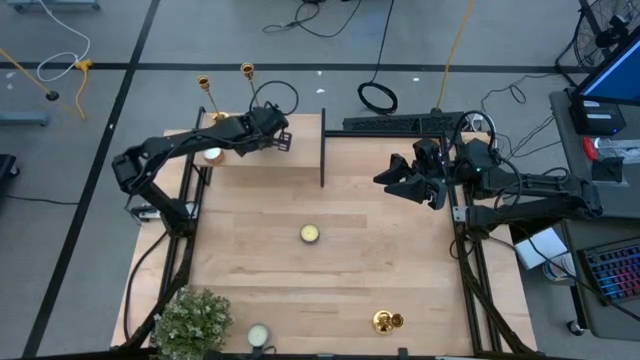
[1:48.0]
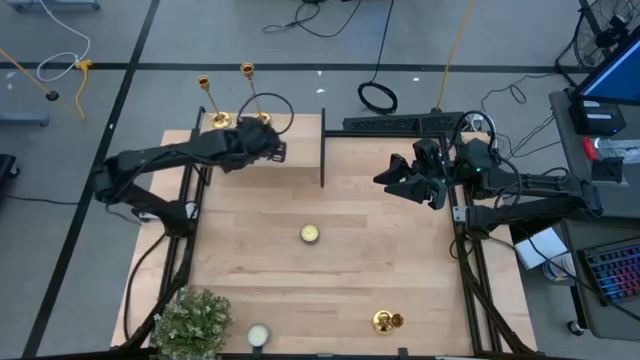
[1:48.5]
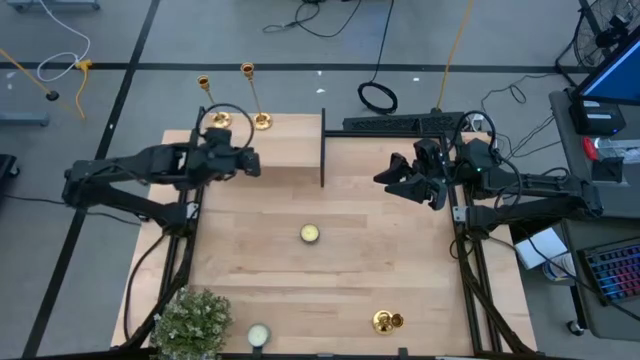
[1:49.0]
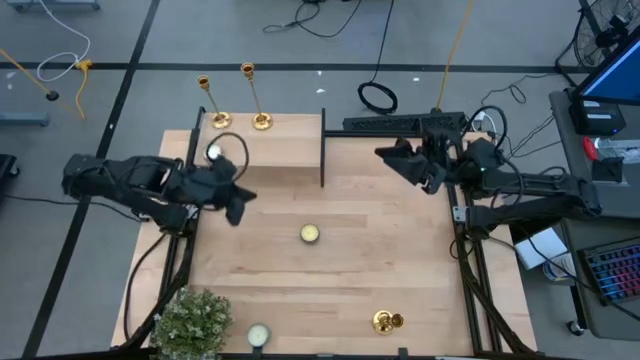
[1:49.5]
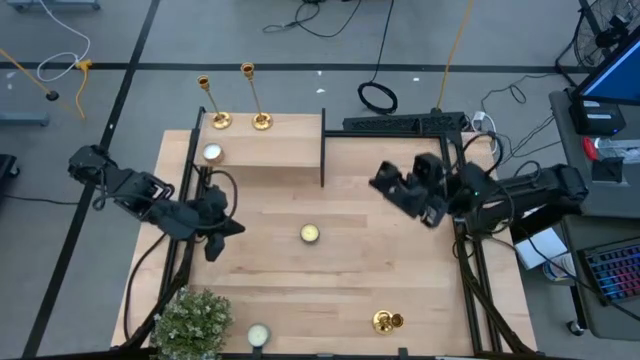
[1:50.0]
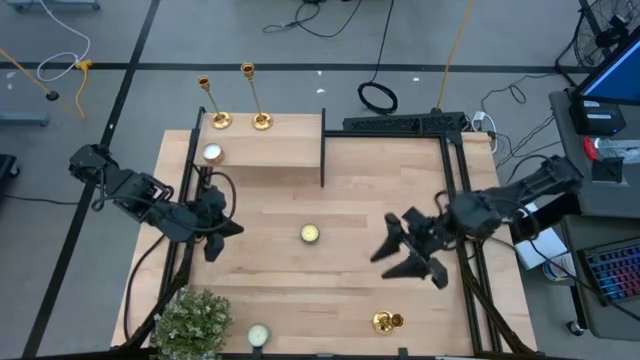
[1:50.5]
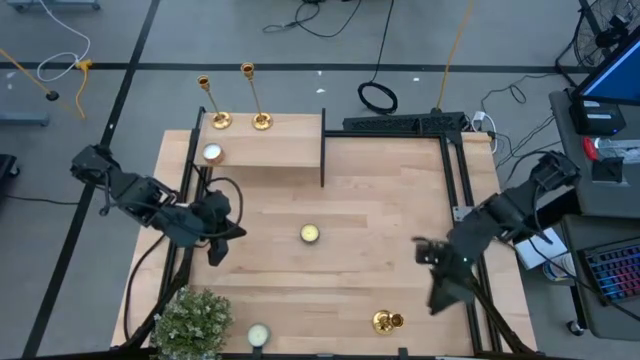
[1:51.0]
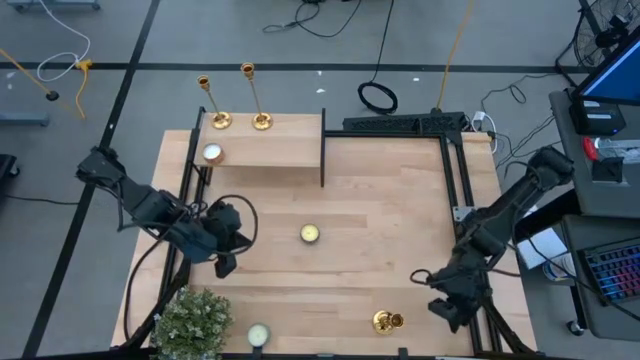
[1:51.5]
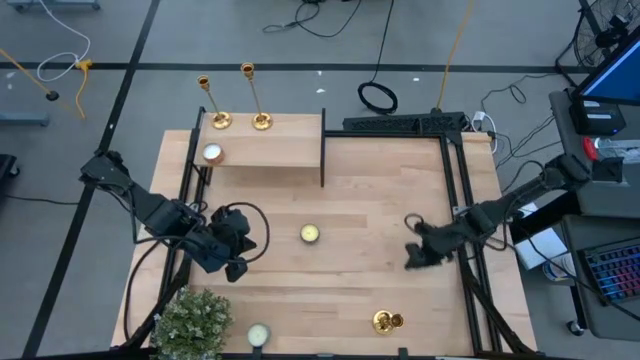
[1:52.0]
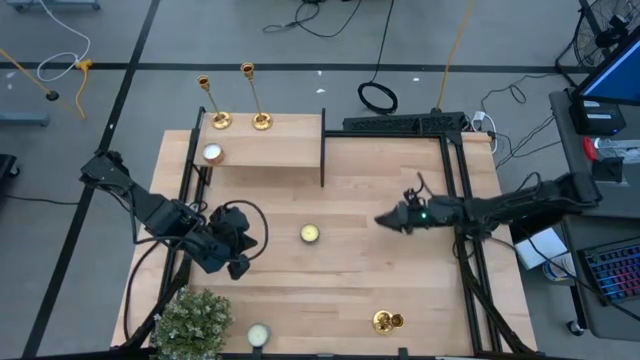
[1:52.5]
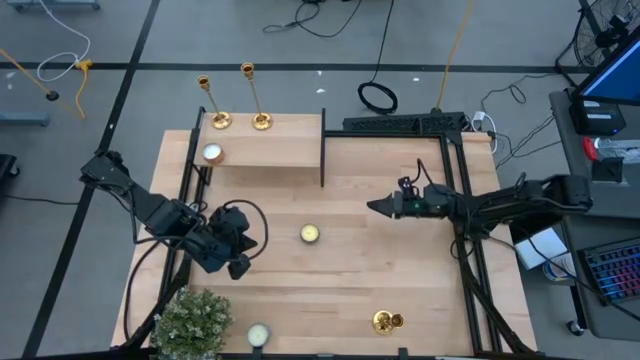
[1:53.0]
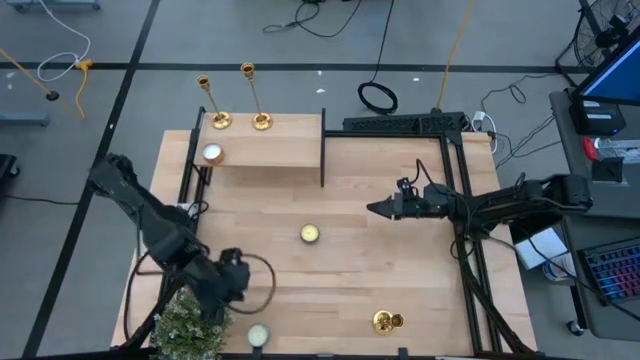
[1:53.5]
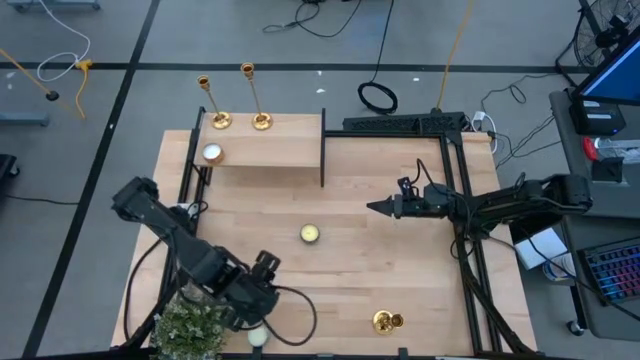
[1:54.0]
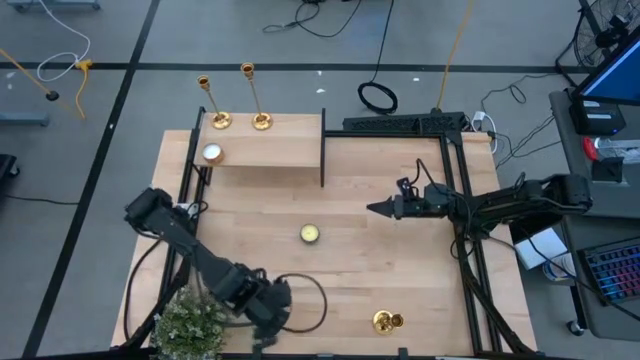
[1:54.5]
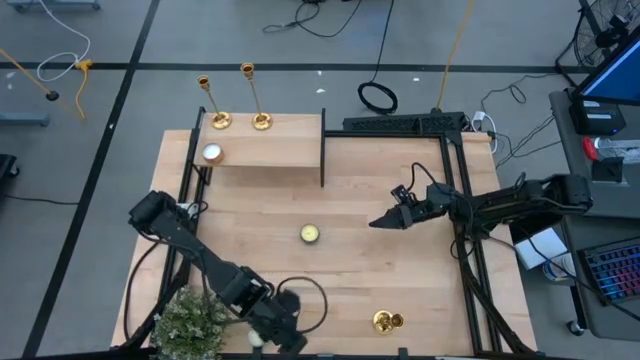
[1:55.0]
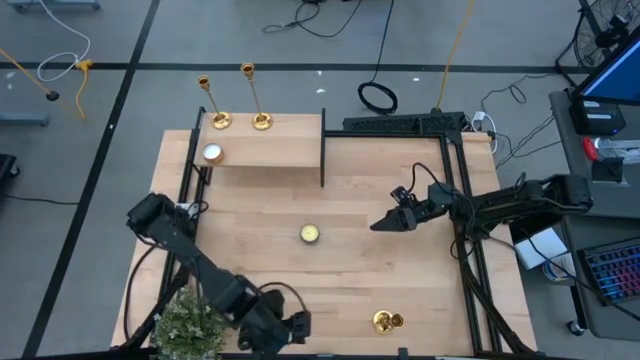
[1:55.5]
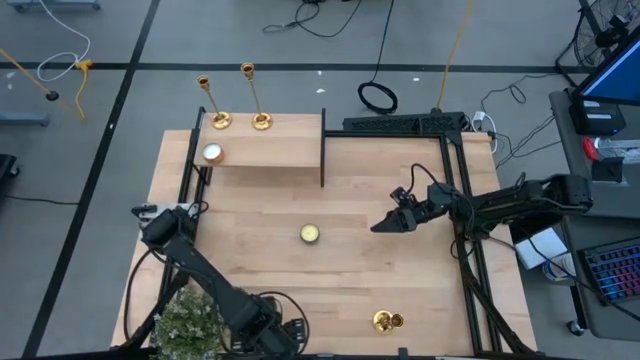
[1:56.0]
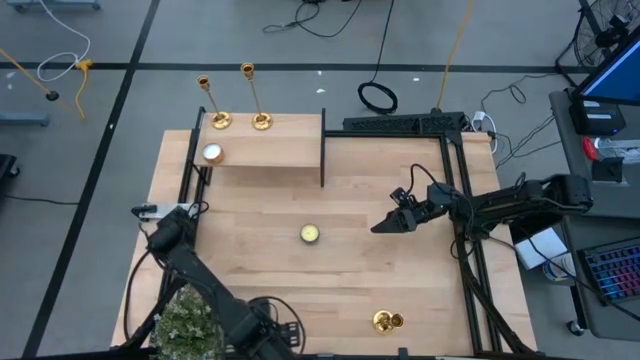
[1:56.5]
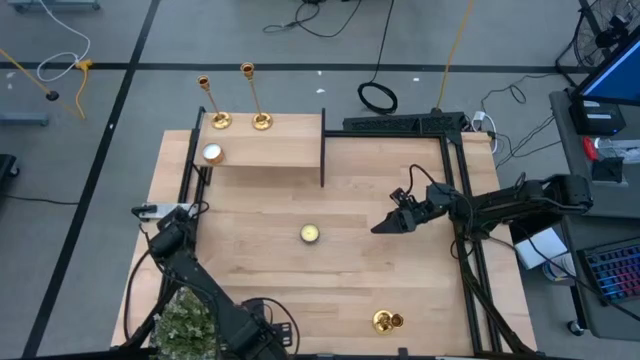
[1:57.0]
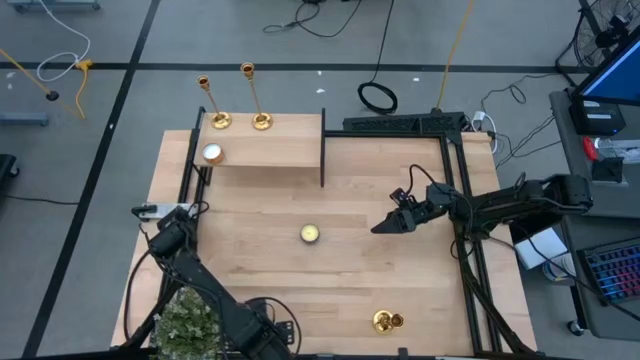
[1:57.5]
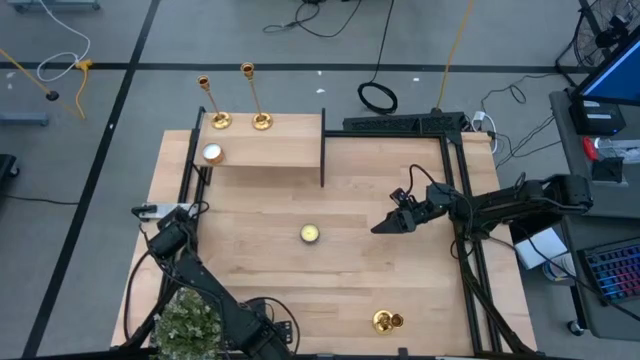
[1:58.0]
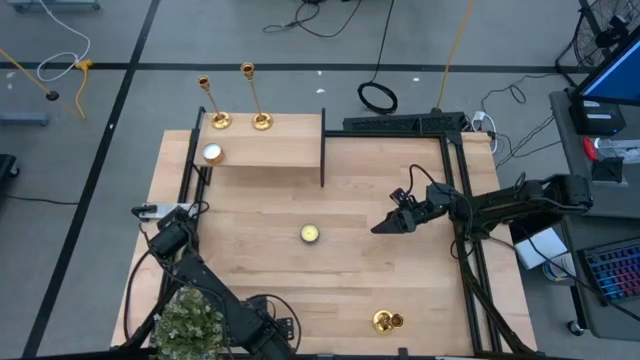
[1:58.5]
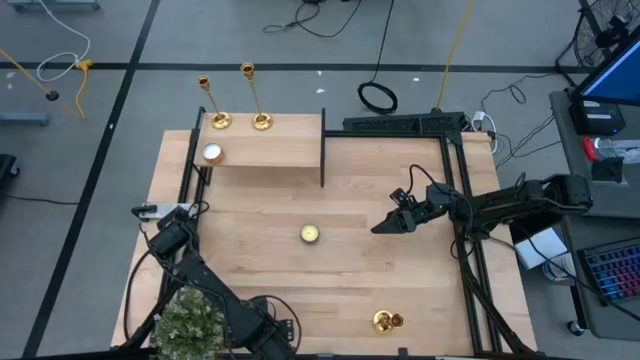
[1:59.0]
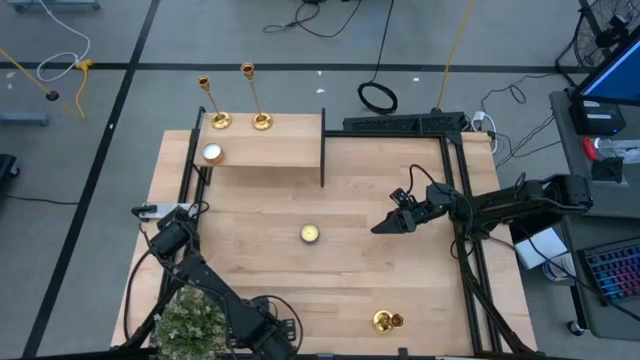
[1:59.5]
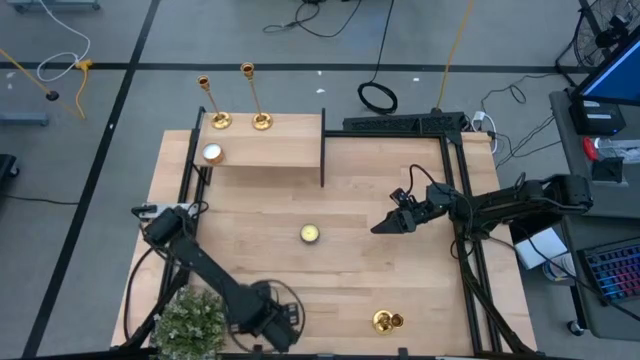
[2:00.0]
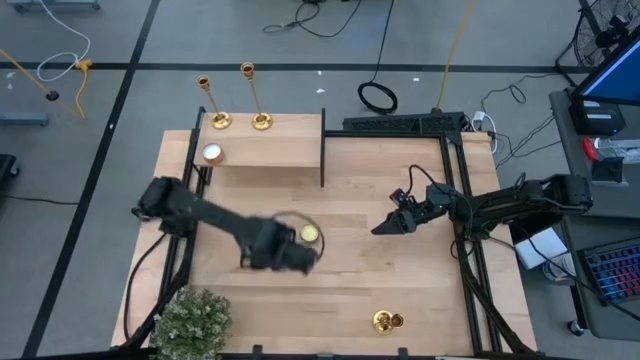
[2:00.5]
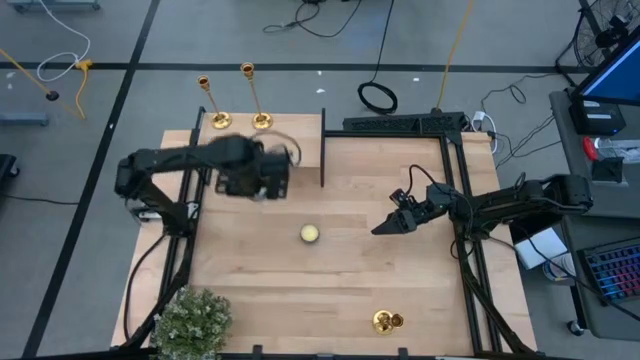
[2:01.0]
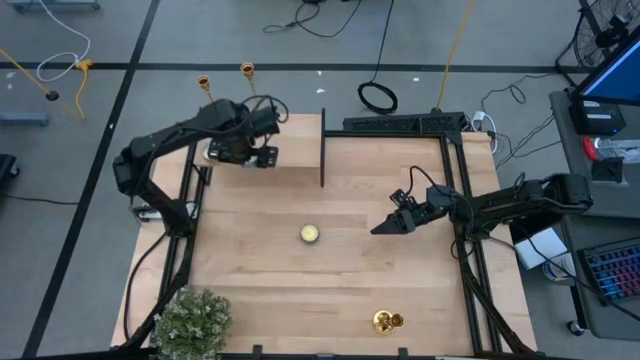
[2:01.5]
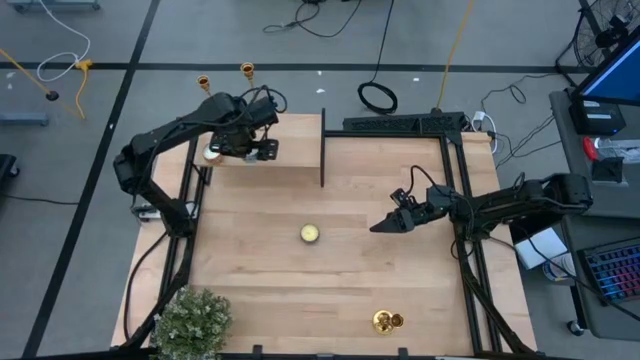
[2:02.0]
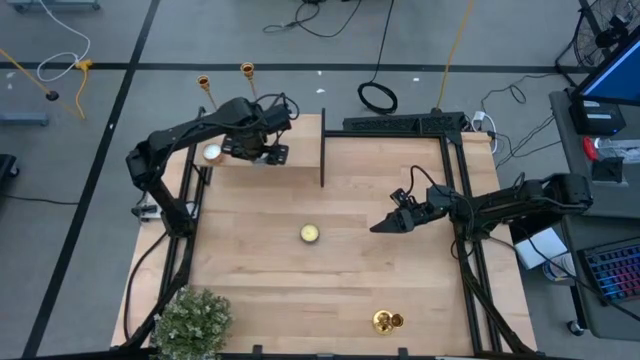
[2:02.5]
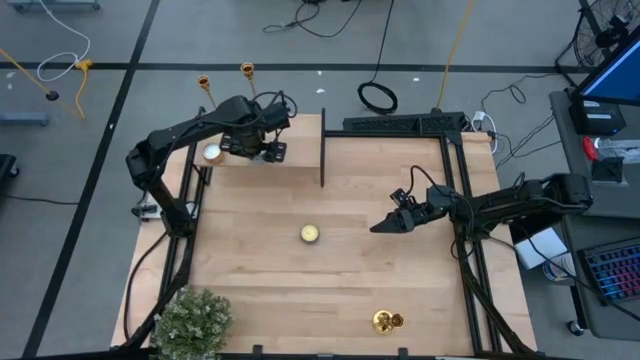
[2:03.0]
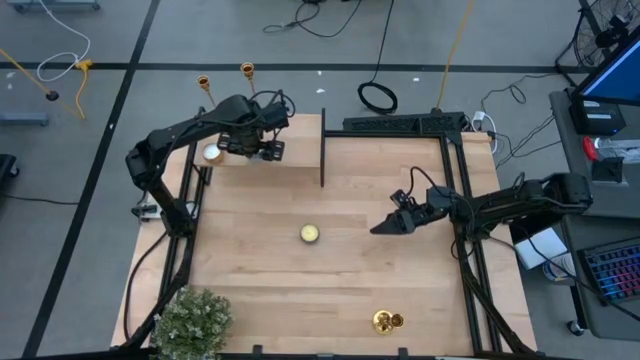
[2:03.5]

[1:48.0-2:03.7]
Task: Pick & Place candle stick holders
Put the blue scented candle on the shelf
